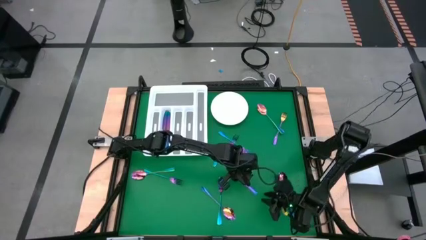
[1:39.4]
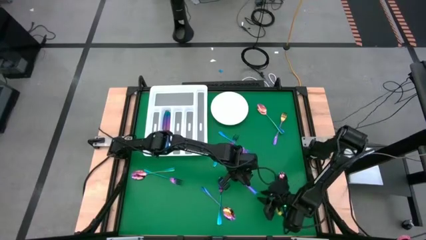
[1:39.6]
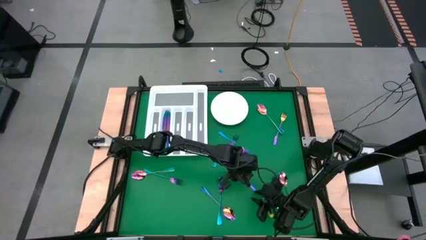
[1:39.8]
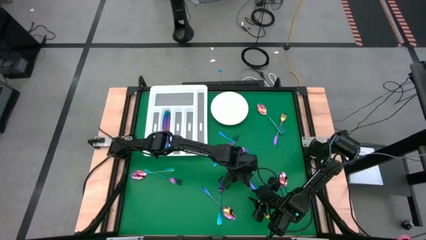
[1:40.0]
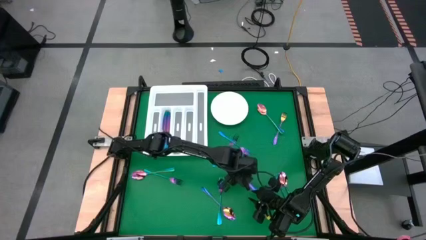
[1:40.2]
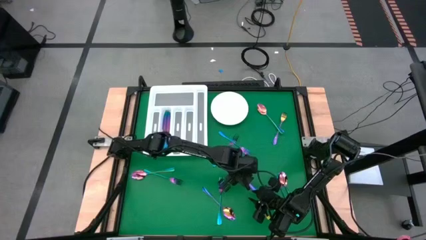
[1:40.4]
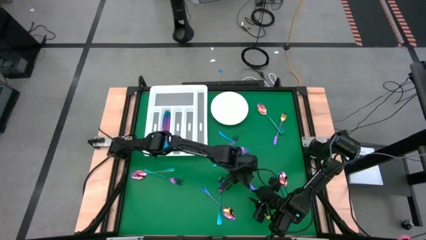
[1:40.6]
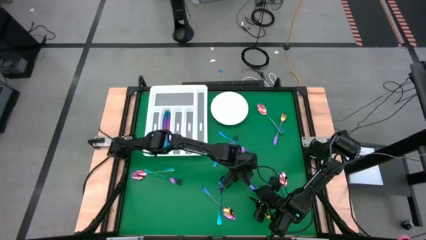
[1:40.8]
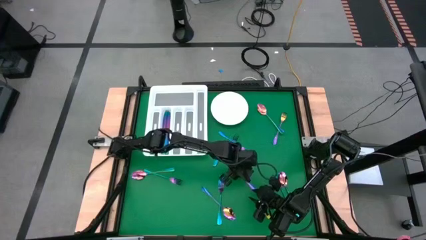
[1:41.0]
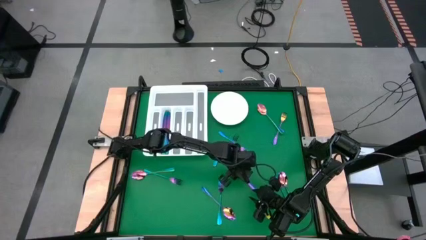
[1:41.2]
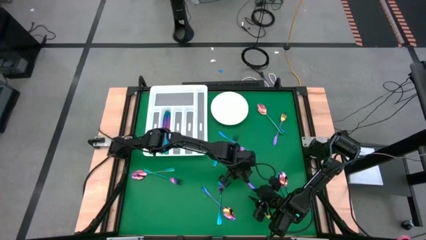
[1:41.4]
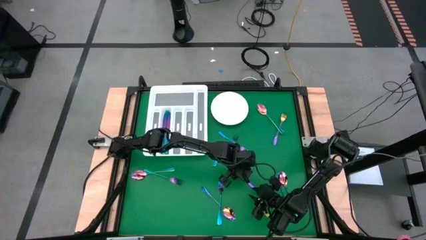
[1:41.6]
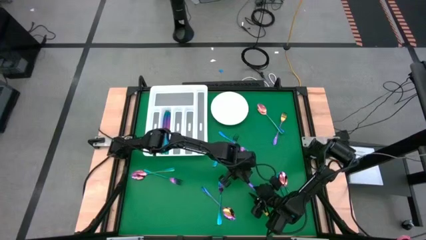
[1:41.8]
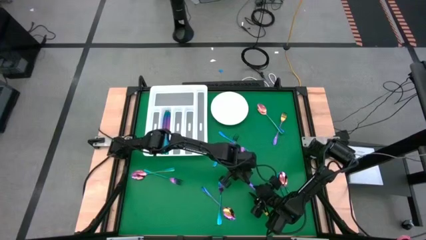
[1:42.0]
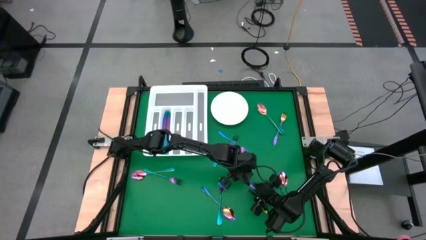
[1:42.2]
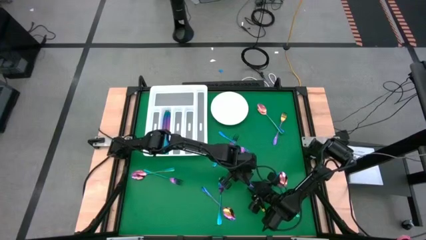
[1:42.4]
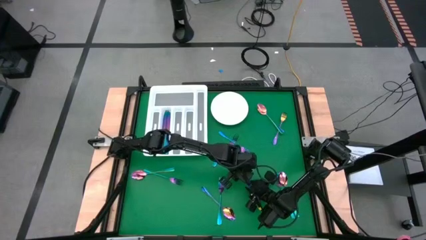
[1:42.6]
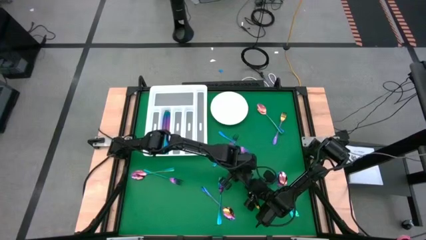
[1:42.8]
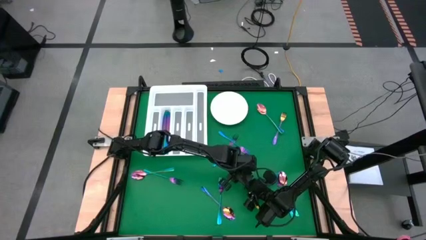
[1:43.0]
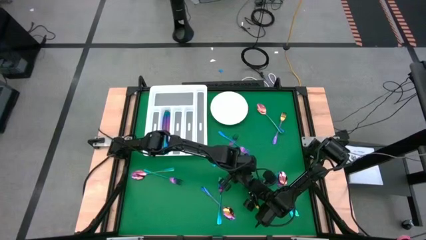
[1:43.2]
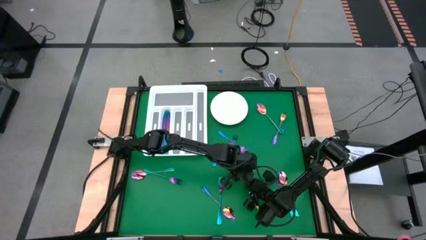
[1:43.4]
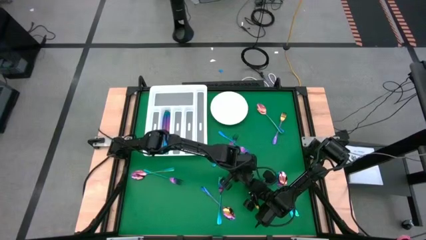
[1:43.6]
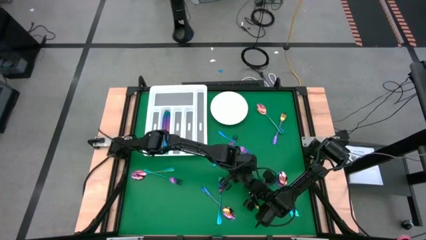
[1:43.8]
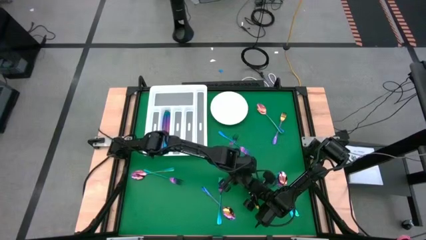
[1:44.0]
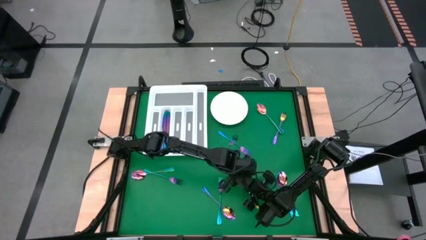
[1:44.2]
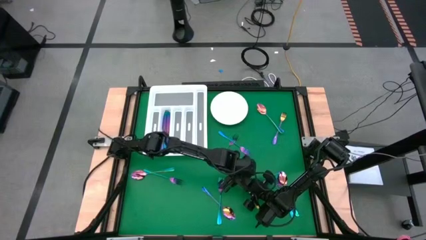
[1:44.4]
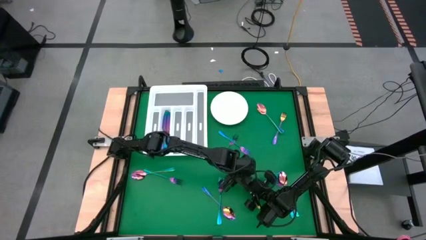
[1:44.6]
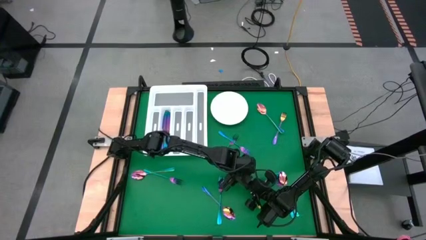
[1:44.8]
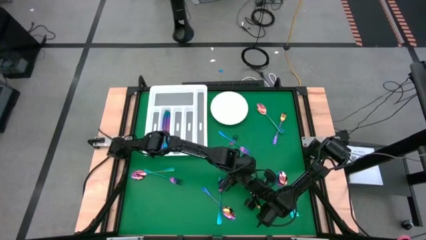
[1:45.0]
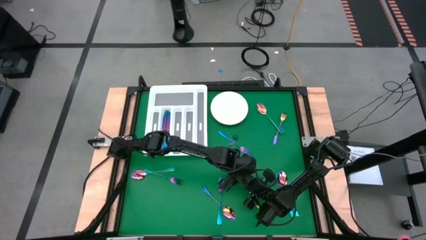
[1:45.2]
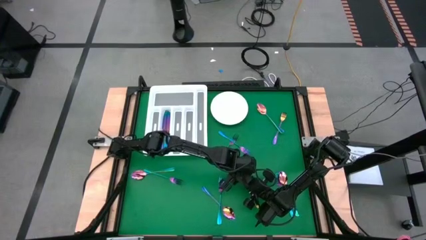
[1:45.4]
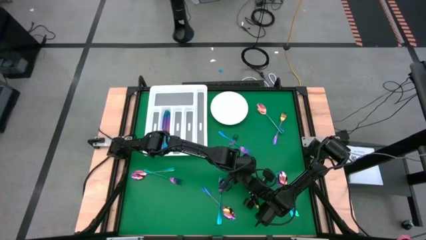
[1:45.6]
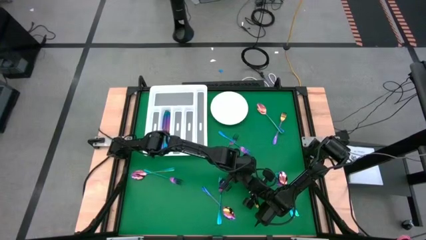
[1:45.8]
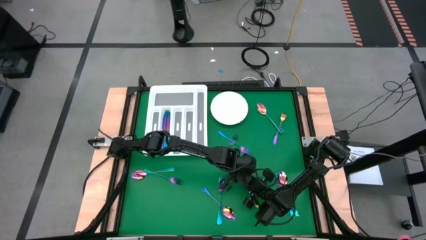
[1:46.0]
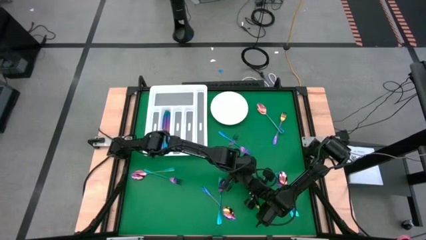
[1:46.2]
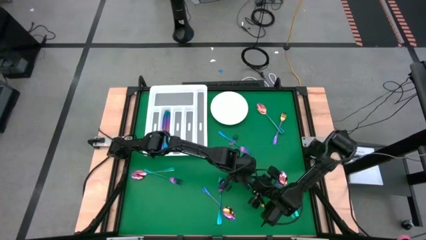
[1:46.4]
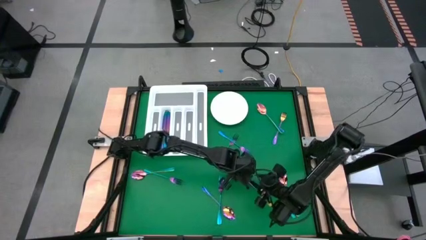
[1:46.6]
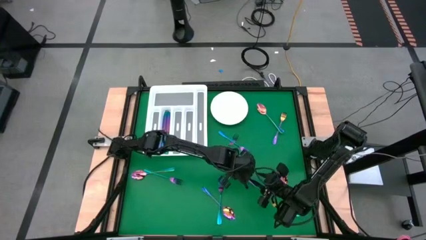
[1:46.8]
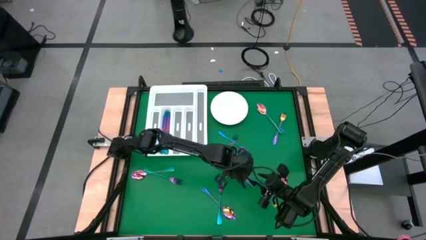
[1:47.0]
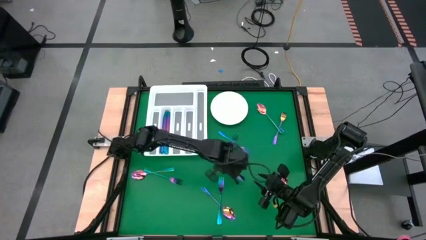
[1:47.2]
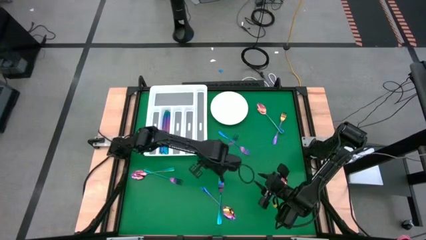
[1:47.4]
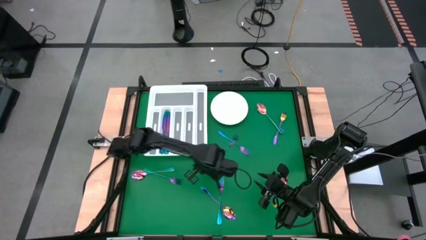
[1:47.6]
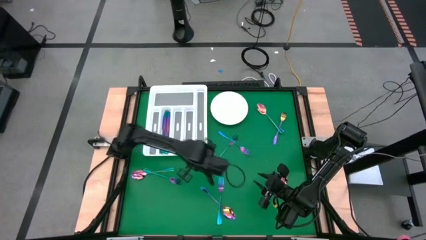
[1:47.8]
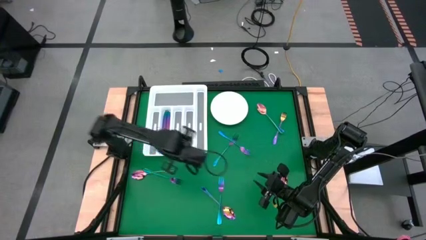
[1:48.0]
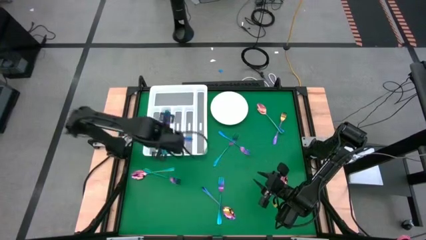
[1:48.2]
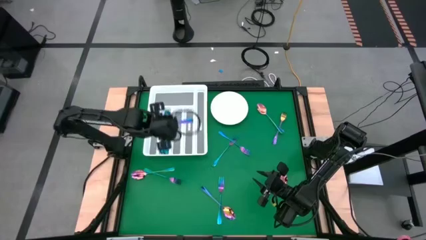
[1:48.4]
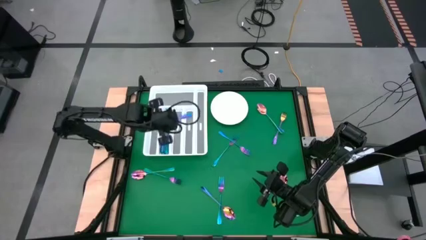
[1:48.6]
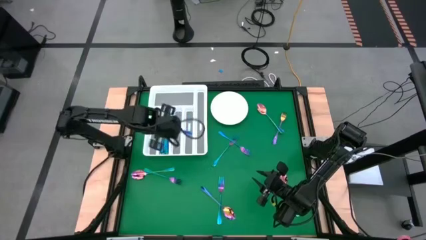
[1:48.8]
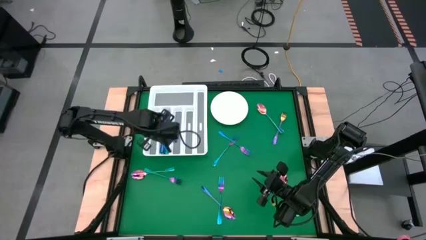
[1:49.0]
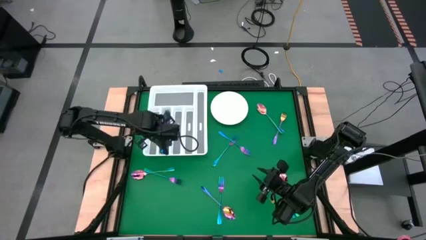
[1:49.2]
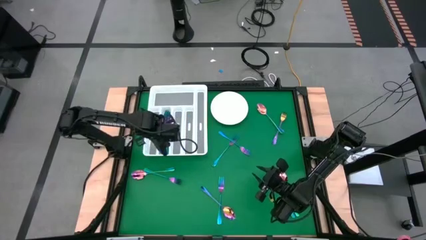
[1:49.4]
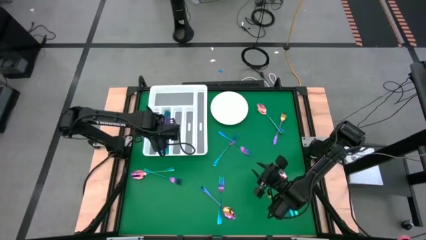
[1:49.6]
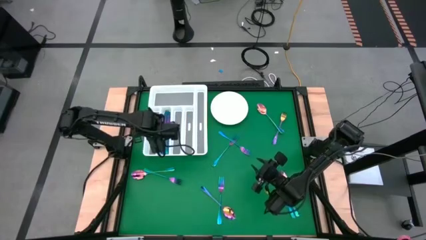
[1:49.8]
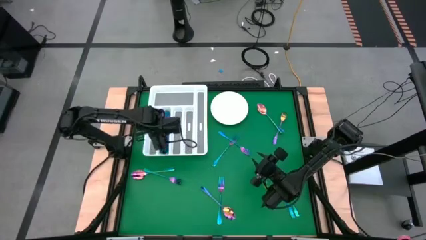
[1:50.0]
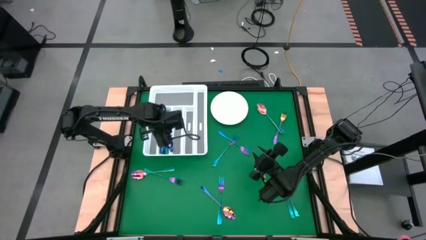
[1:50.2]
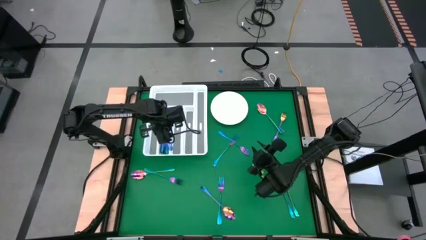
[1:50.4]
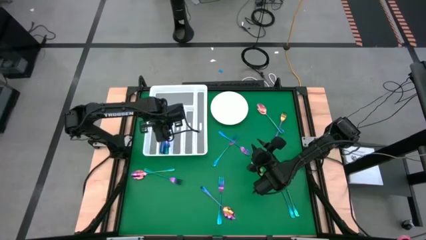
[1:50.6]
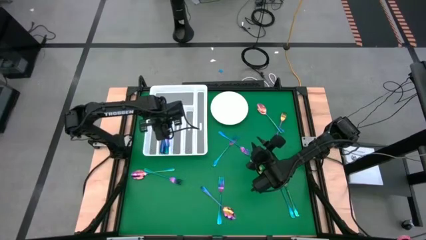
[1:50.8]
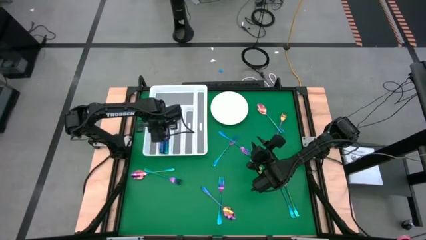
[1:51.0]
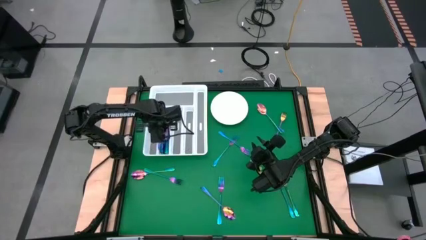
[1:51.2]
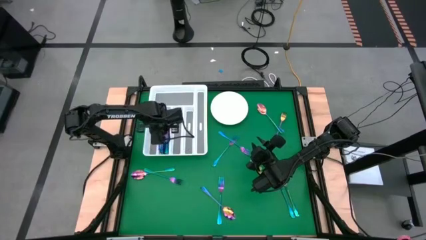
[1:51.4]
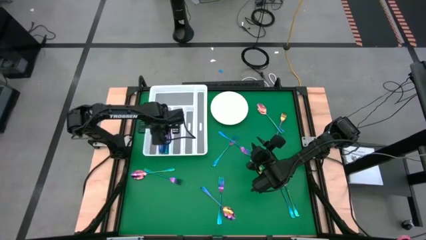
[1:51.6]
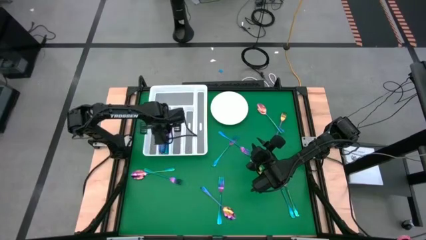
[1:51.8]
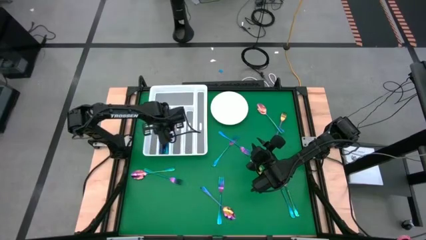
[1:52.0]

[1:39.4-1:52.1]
Task: Sort silverware
Put the blue knife into the silverware tray

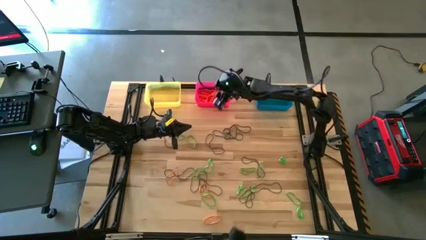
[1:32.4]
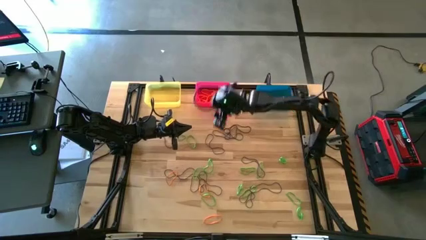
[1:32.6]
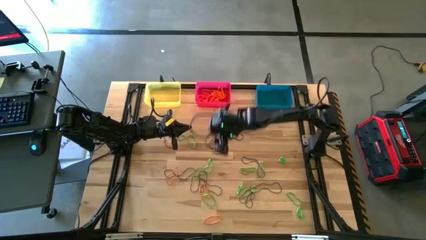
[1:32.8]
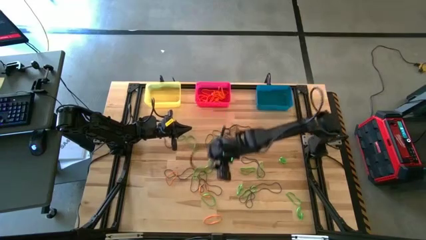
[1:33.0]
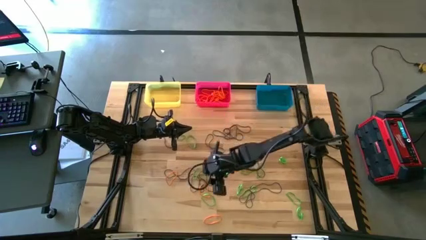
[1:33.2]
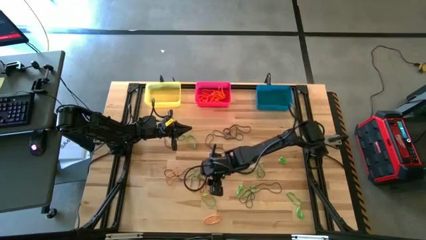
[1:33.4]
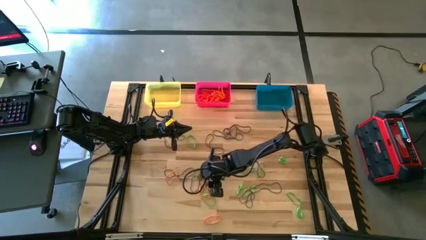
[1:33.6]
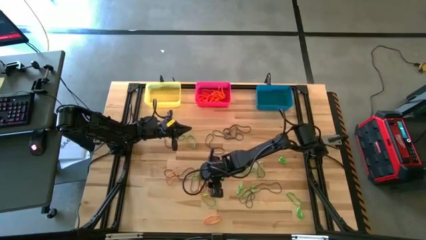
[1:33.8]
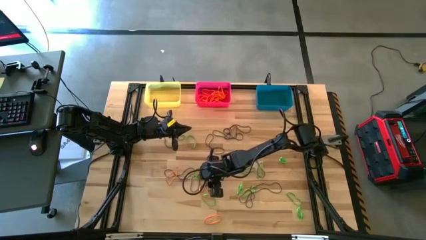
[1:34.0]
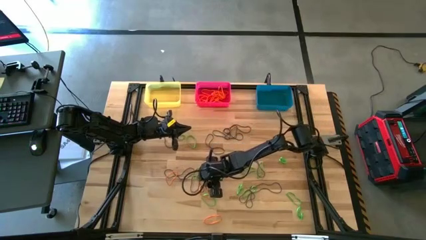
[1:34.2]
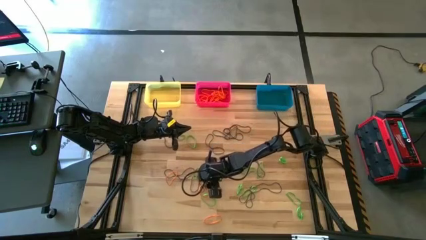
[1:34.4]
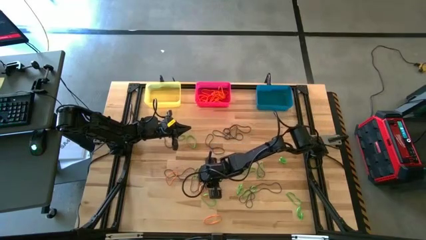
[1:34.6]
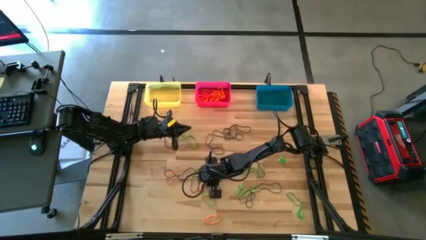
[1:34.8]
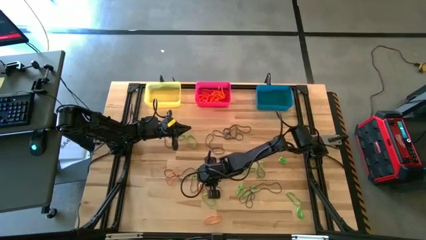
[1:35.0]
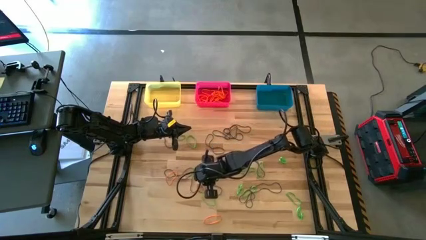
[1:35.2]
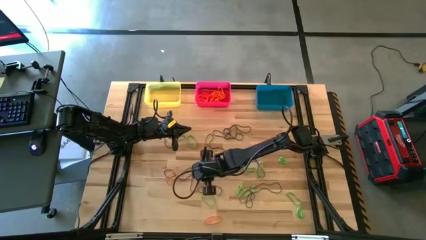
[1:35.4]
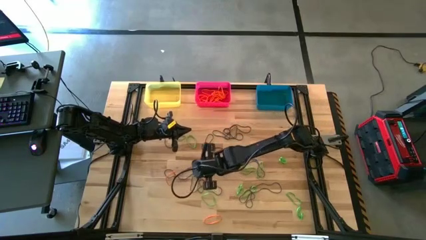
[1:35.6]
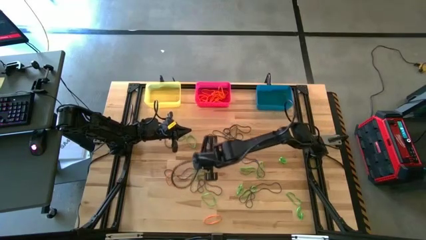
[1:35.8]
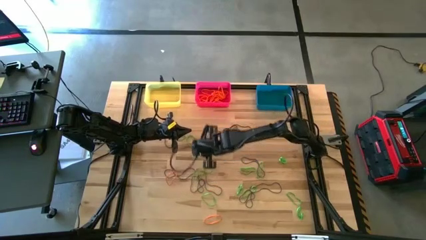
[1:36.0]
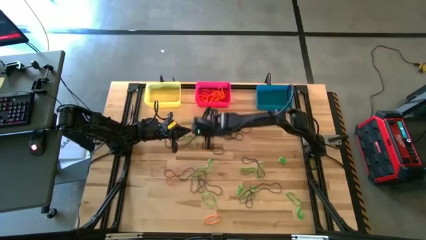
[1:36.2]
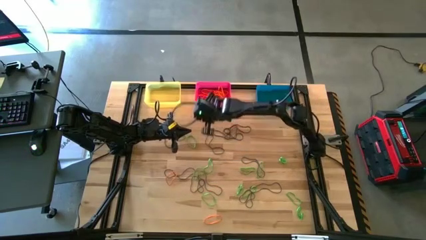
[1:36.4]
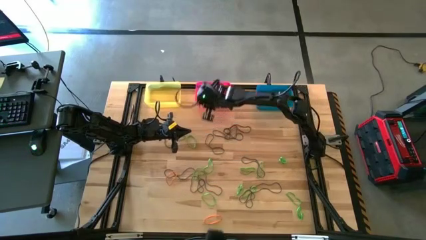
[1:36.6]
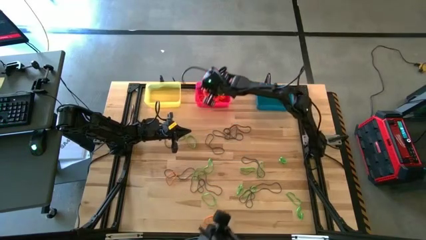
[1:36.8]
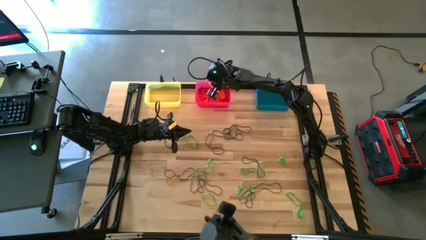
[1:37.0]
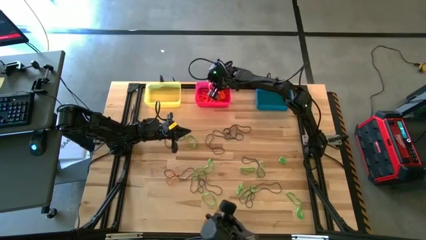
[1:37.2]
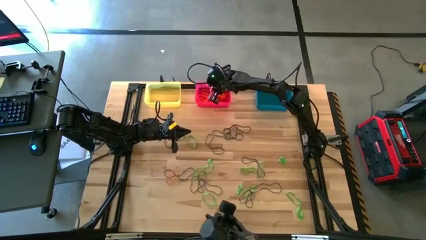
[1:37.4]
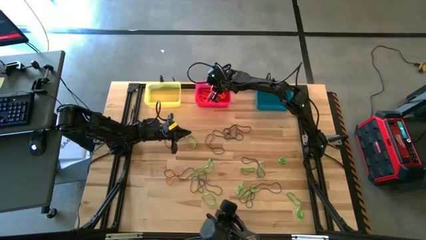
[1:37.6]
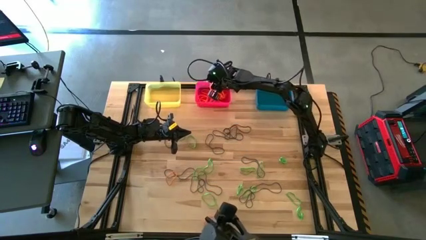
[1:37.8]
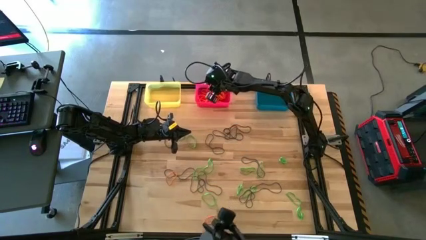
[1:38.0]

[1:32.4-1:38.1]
Task: Sort rubber bands into baskets
Put the orange rubber band into the pink bin
